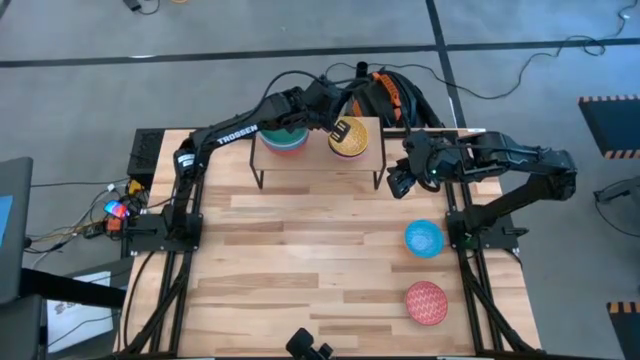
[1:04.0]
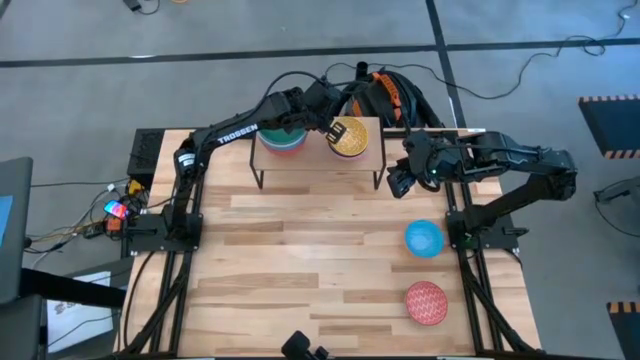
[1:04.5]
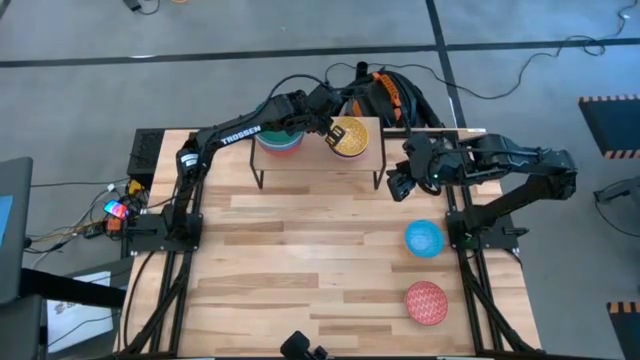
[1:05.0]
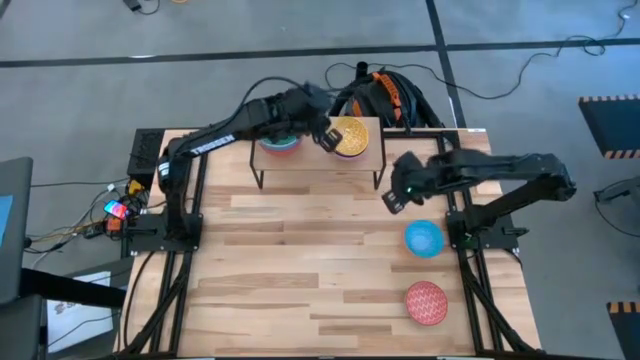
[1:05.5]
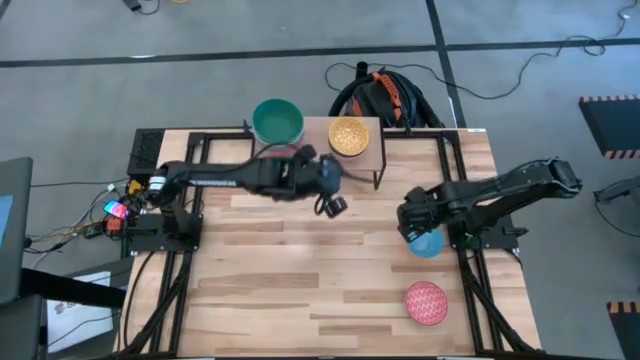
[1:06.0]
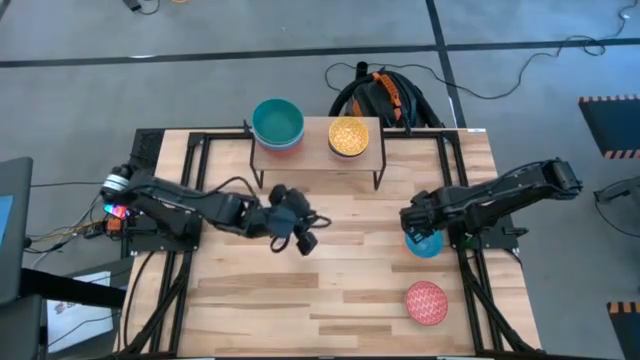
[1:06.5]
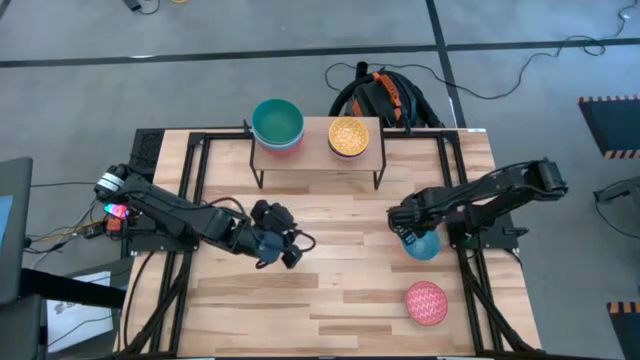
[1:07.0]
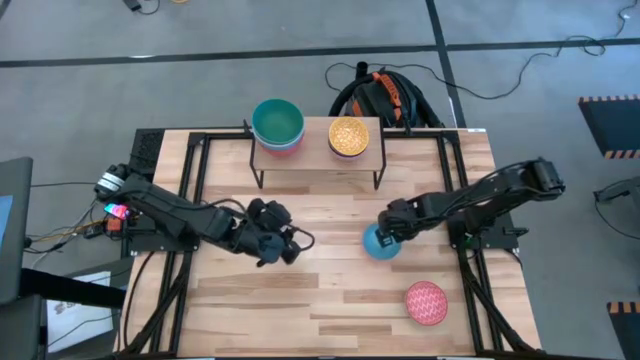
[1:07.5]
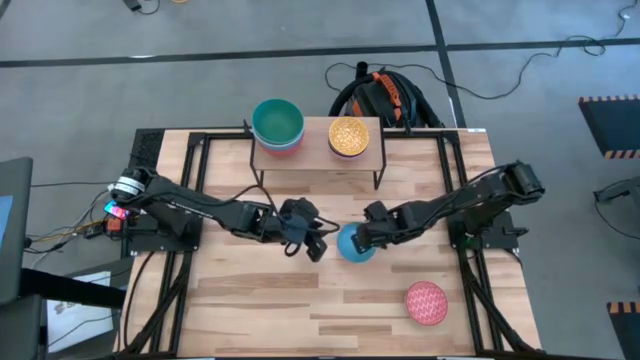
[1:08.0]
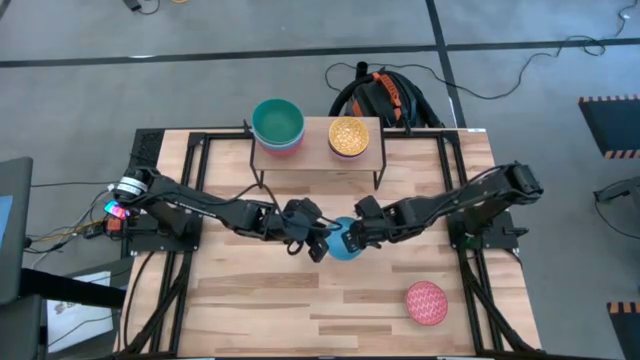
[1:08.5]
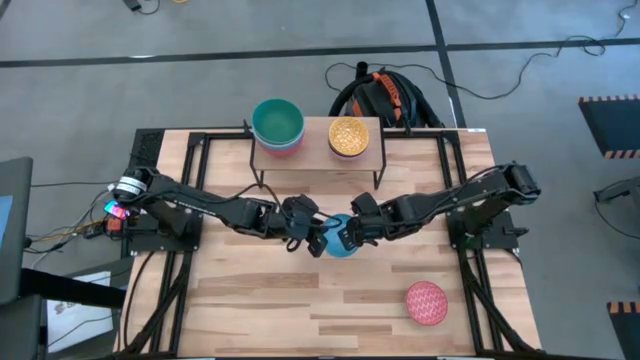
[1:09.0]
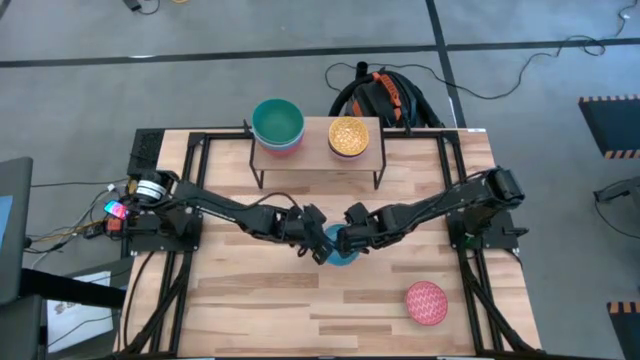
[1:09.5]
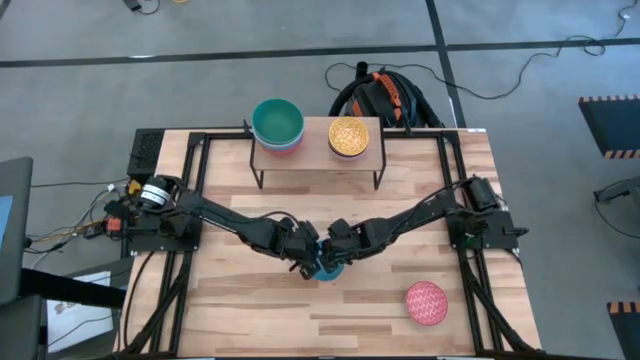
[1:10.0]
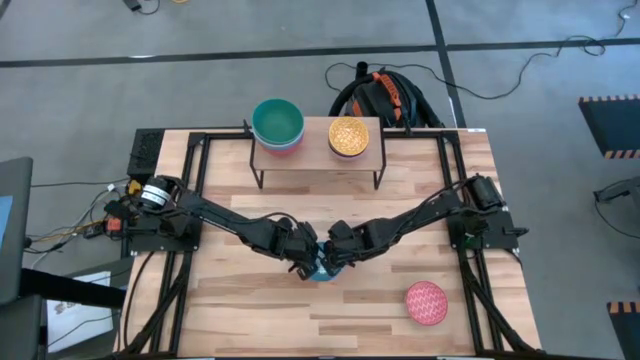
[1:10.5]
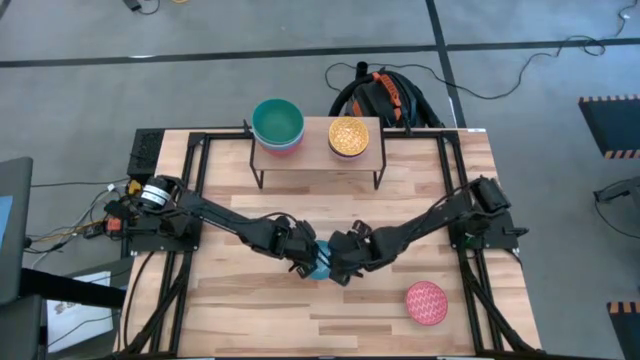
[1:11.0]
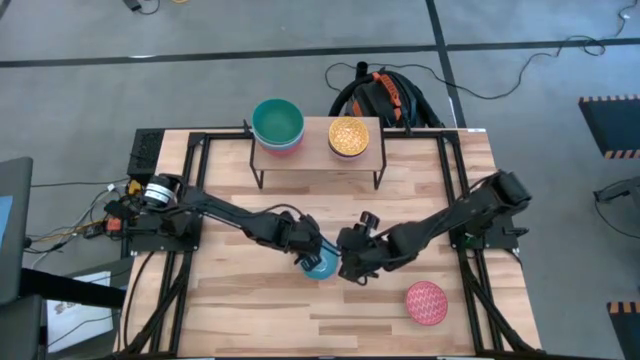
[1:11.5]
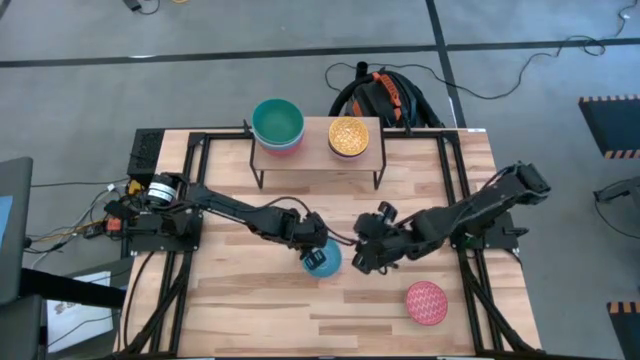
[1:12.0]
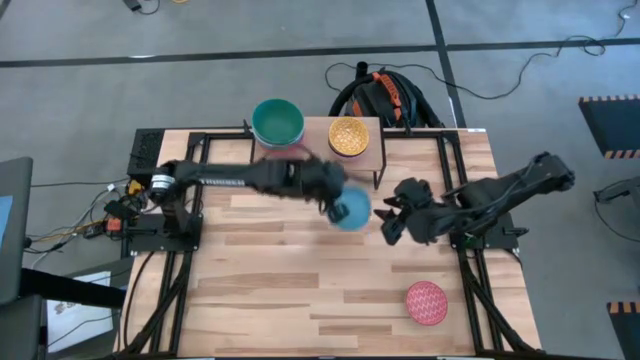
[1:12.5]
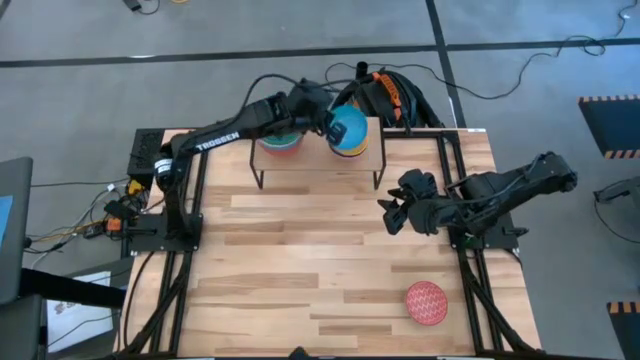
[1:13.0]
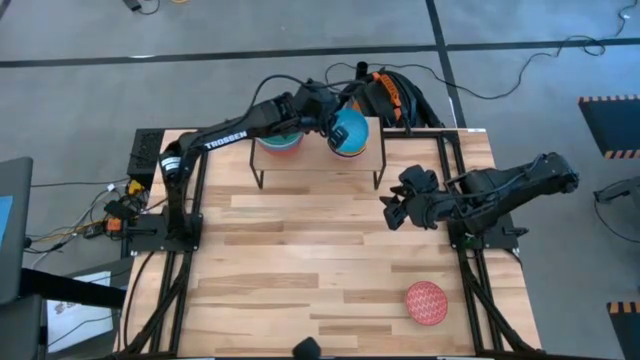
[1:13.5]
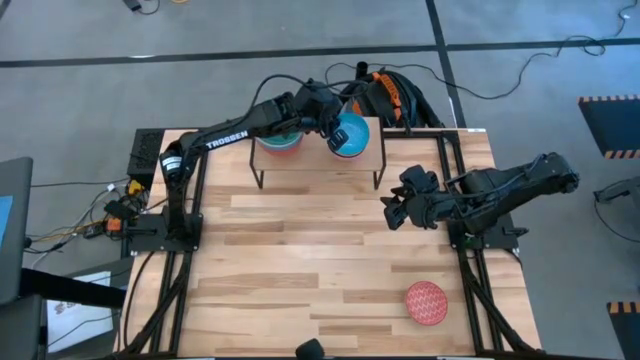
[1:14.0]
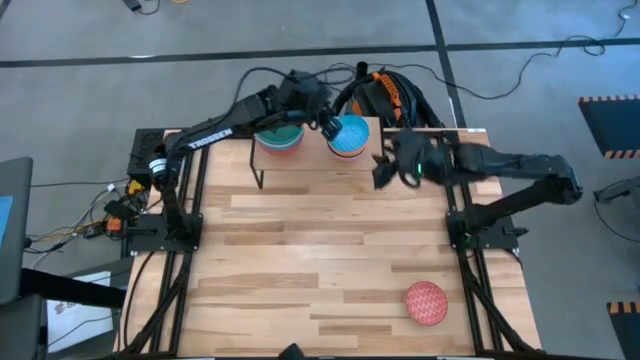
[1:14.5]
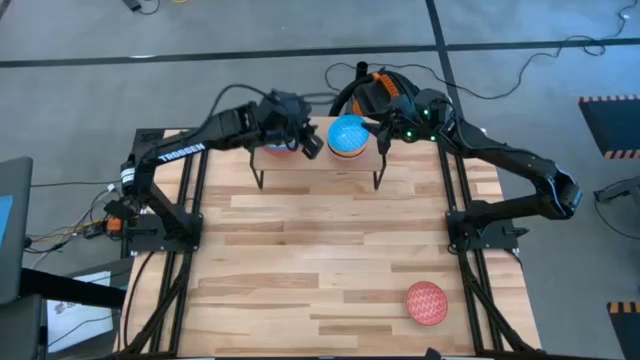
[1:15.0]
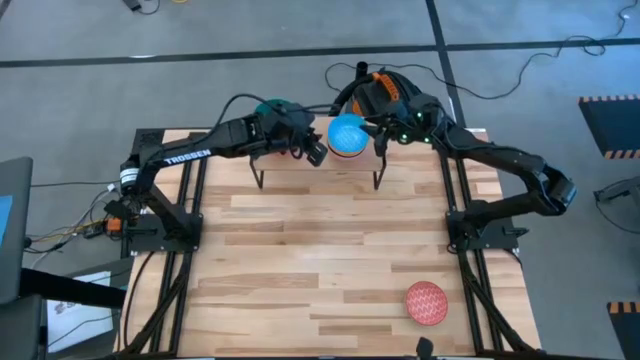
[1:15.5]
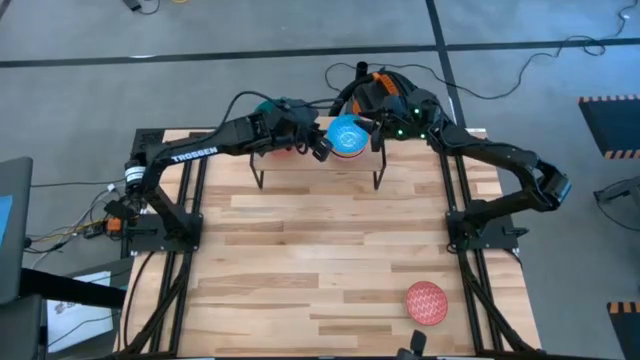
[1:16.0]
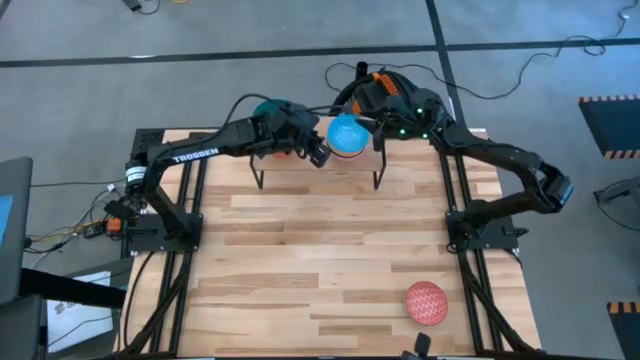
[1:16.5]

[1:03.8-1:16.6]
Task: Place and stack bowls onto a shelf
Stack the light blue patterned bowl on top of the yellow patterned bowl on the shelf

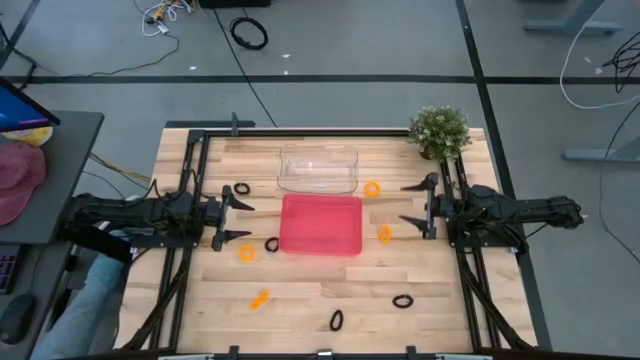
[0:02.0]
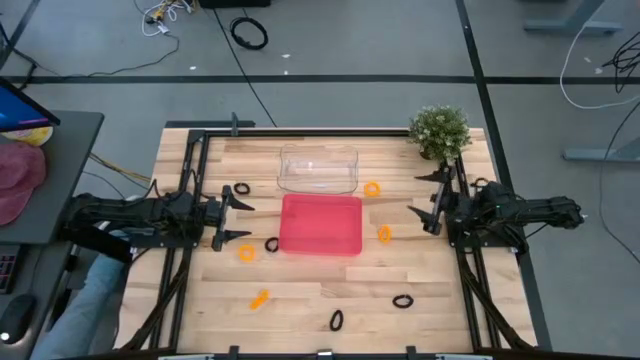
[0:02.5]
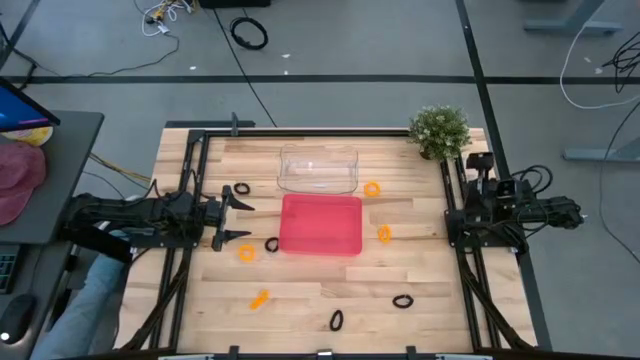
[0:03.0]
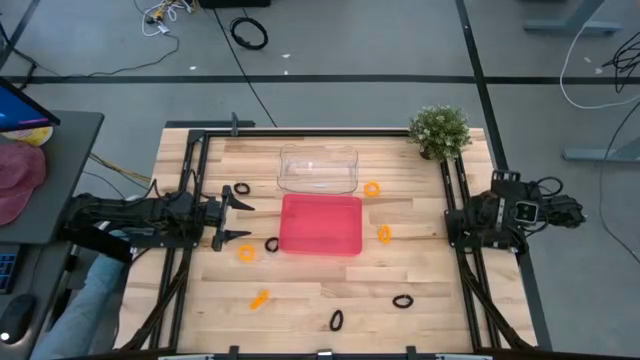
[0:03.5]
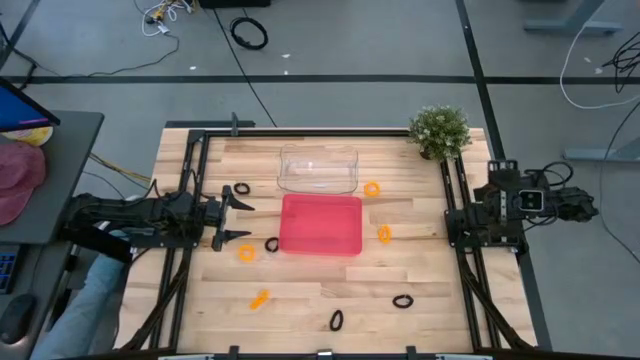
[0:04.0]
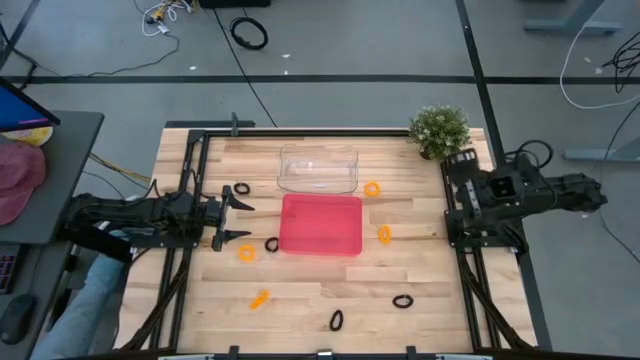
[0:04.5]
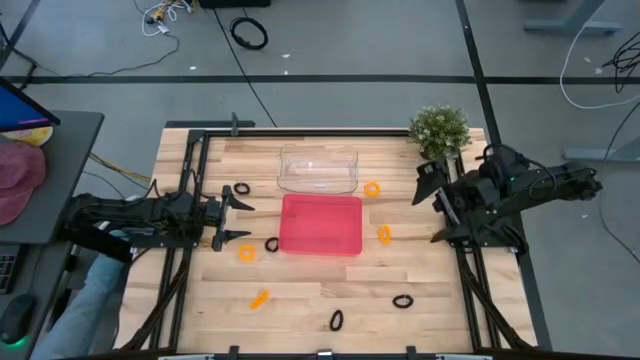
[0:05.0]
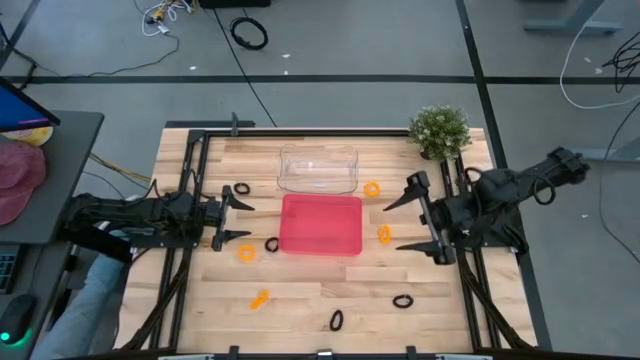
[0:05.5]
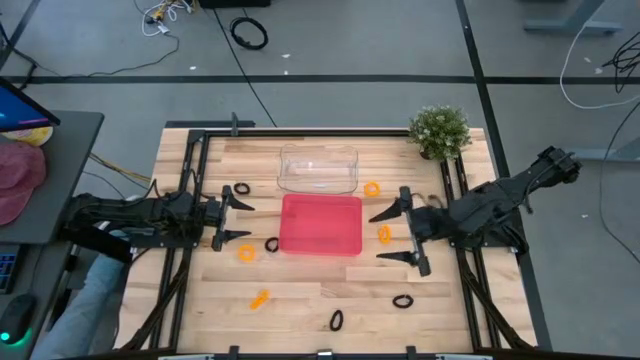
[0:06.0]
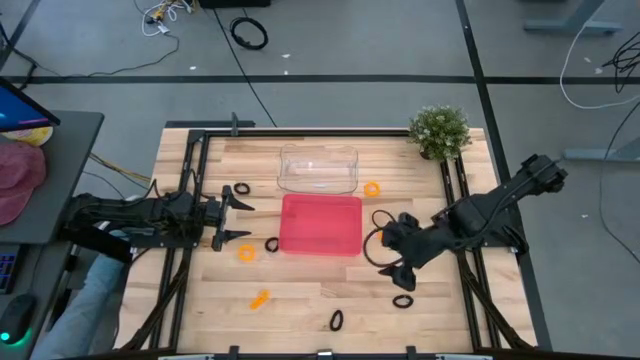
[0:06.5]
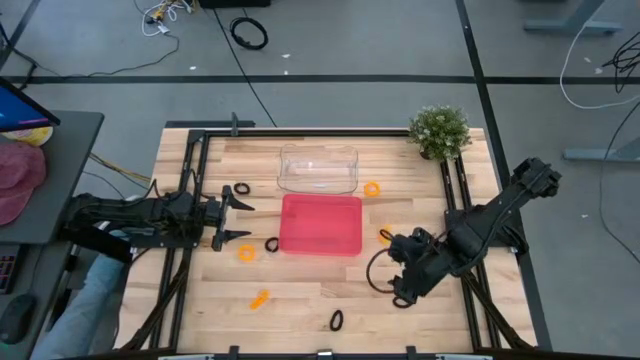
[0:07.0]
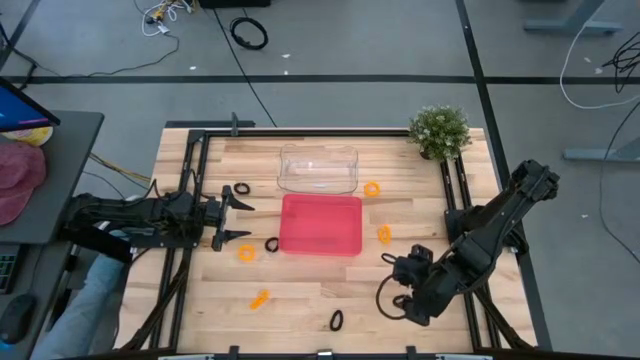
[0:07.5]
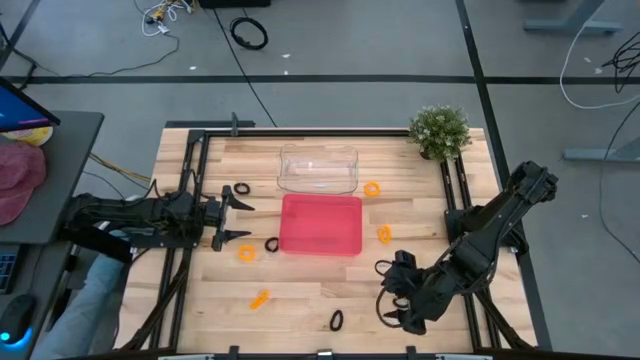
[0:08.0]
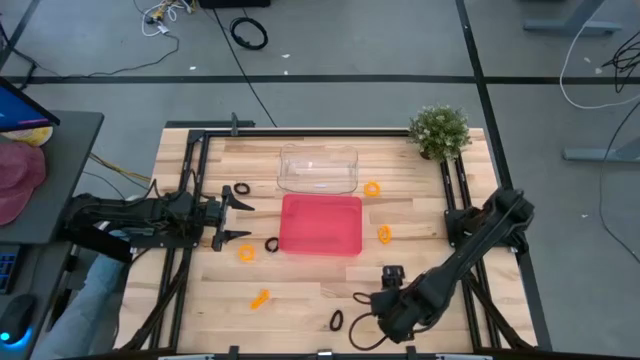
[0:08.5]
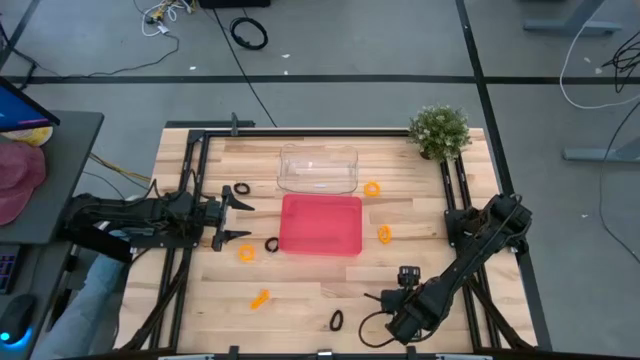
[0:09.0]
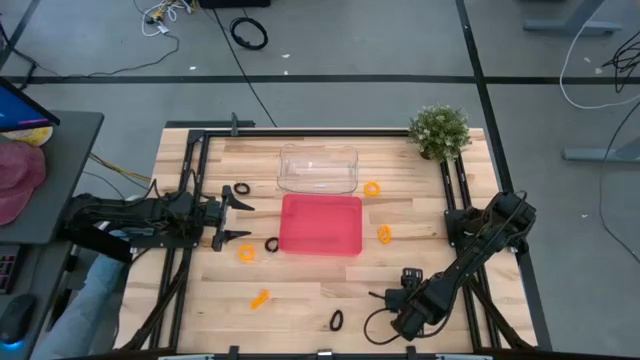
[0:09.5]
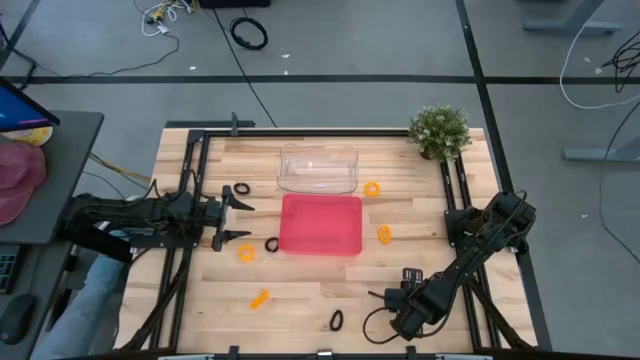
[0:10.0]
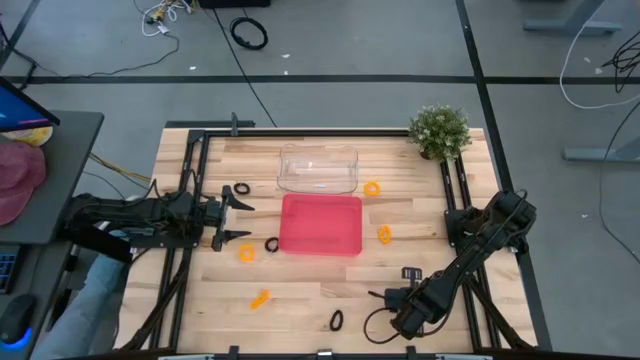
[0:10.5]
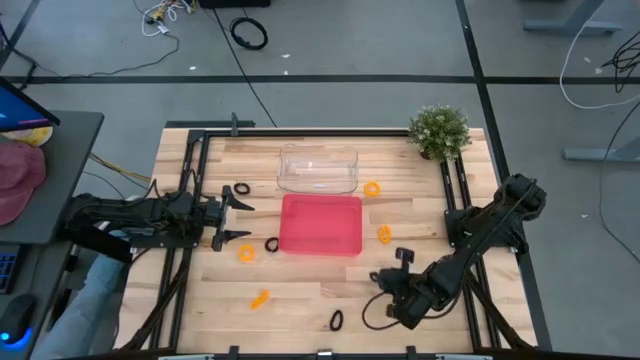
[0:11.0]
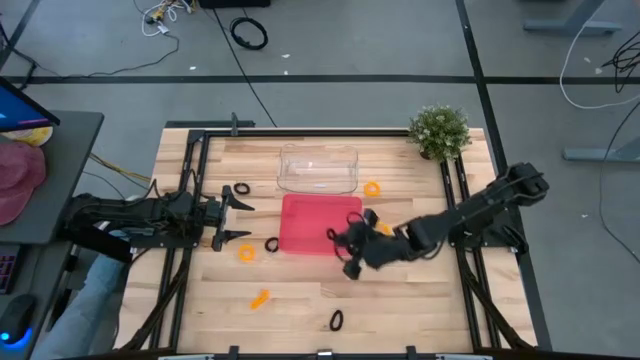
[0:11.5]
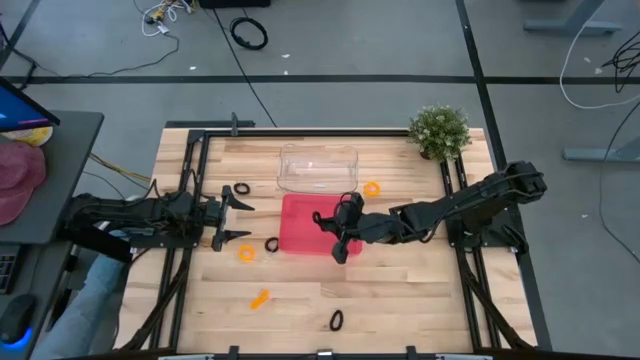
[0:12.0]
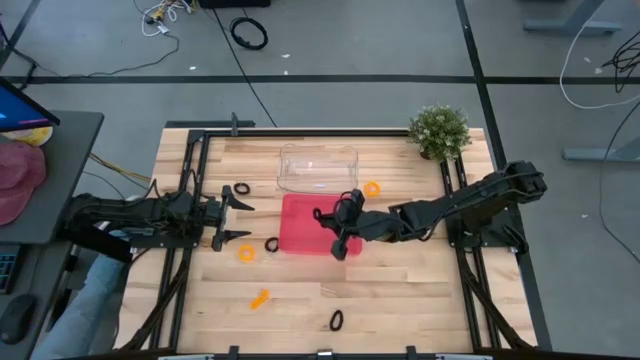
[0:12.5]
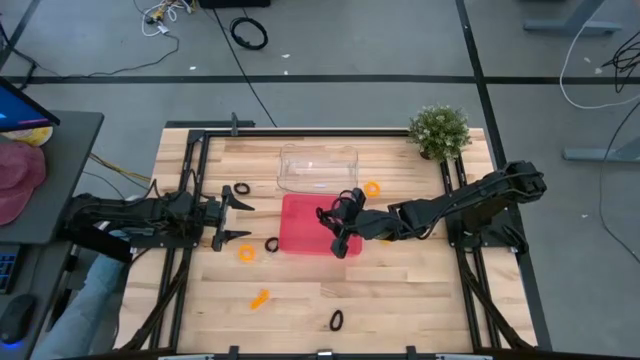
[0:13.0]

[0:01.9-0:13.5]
Task: Sort spring keychains
Put the black spring keychain into the red bin
